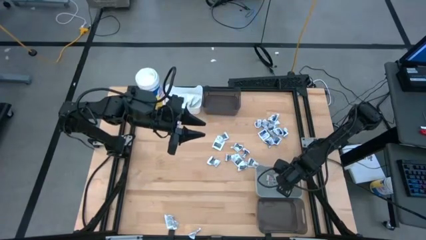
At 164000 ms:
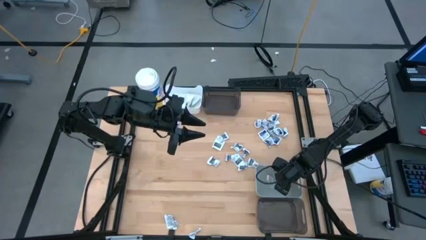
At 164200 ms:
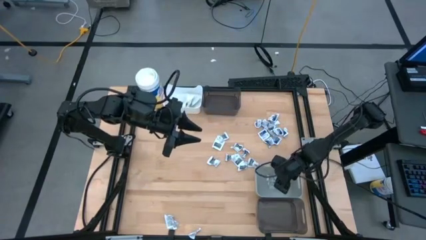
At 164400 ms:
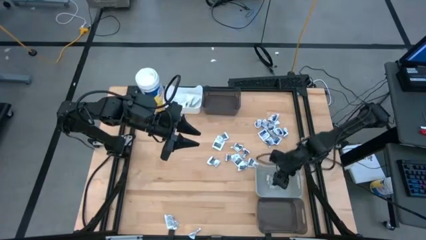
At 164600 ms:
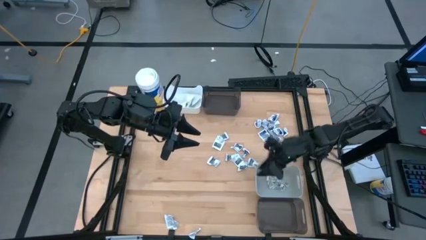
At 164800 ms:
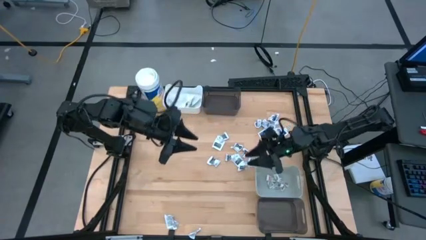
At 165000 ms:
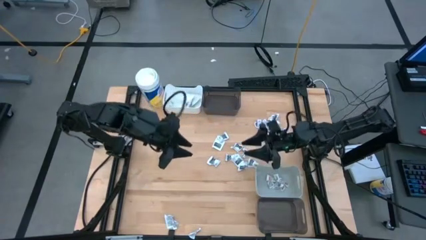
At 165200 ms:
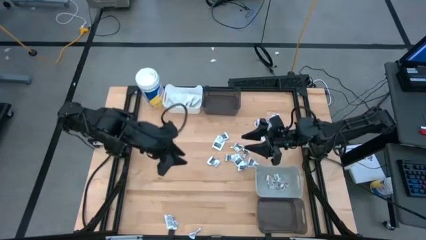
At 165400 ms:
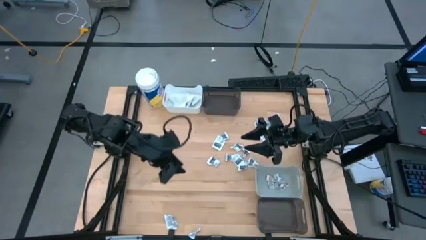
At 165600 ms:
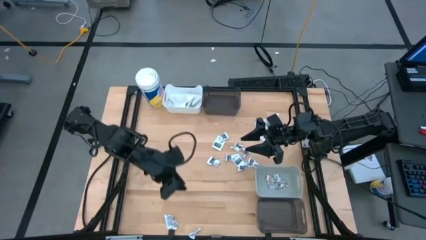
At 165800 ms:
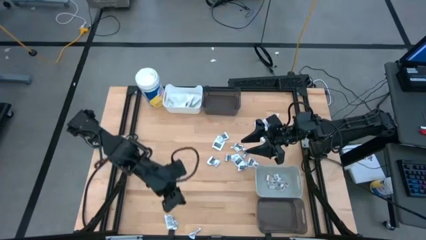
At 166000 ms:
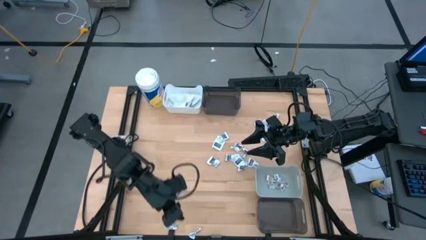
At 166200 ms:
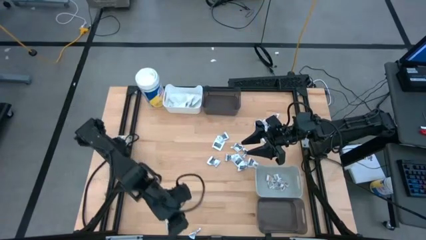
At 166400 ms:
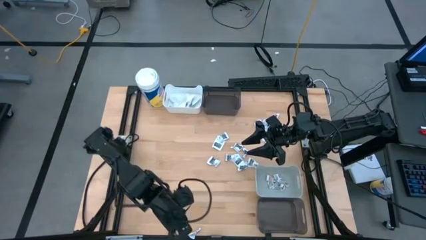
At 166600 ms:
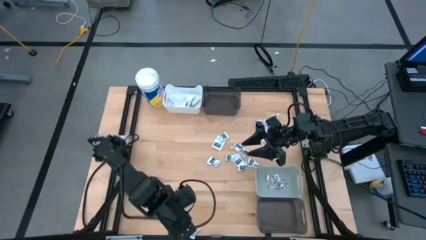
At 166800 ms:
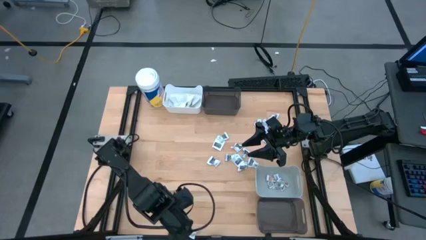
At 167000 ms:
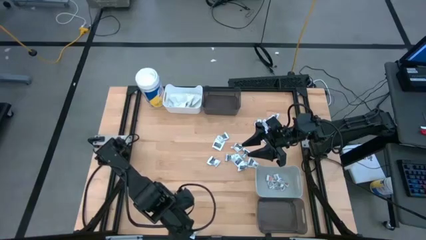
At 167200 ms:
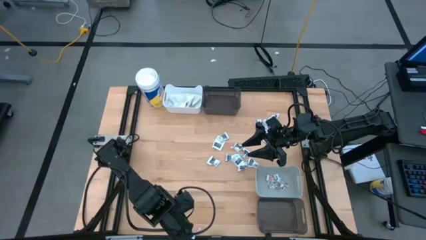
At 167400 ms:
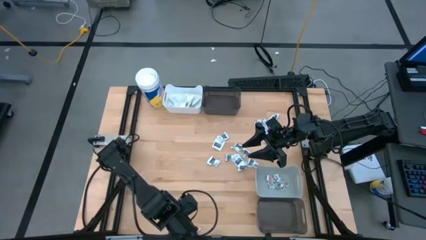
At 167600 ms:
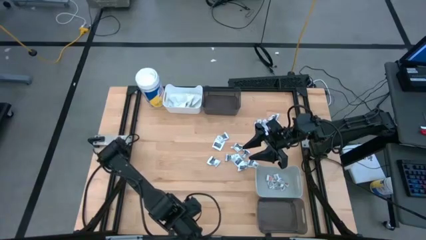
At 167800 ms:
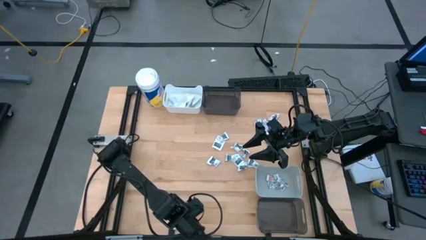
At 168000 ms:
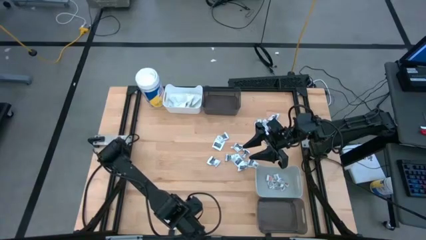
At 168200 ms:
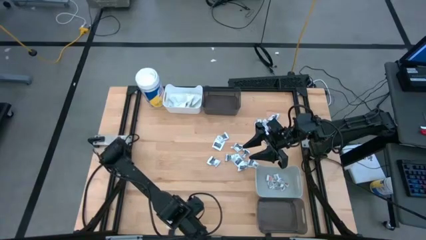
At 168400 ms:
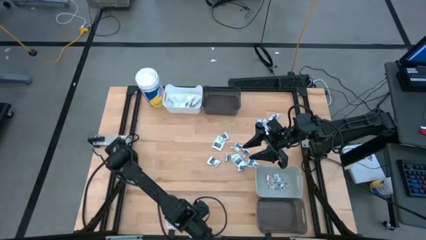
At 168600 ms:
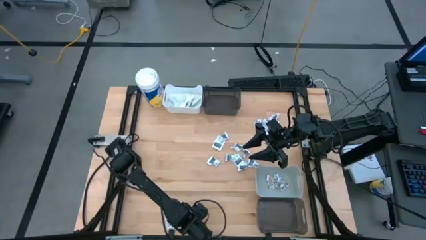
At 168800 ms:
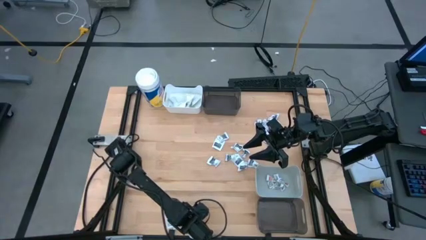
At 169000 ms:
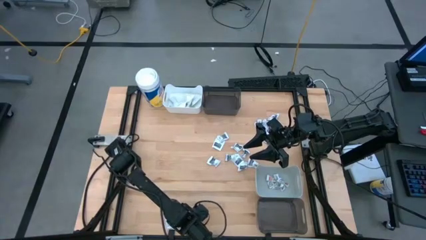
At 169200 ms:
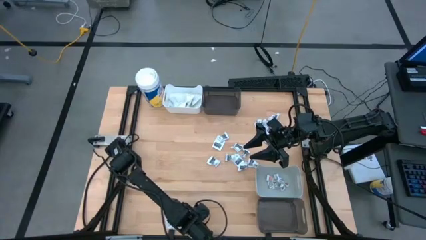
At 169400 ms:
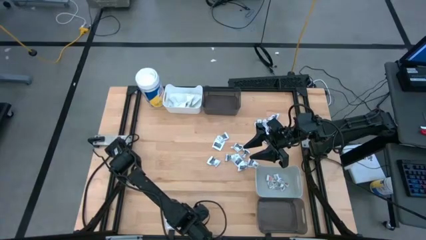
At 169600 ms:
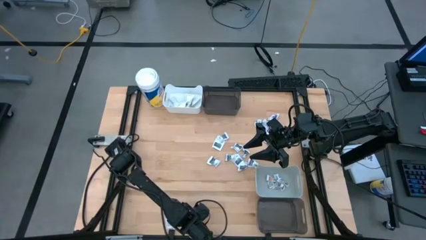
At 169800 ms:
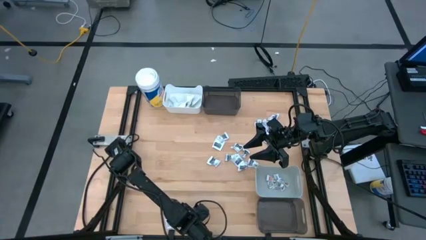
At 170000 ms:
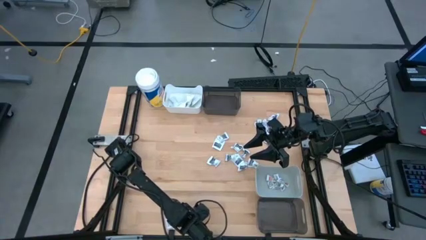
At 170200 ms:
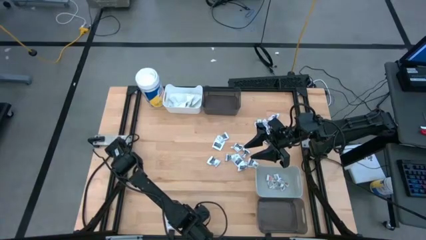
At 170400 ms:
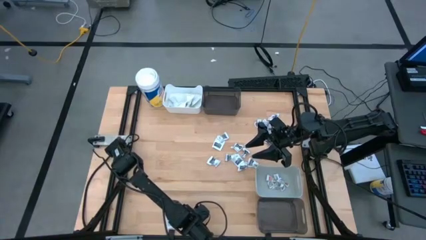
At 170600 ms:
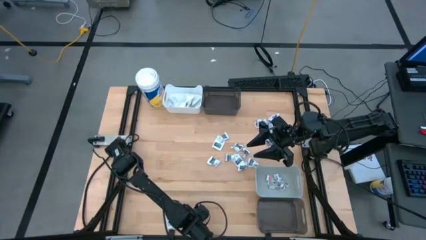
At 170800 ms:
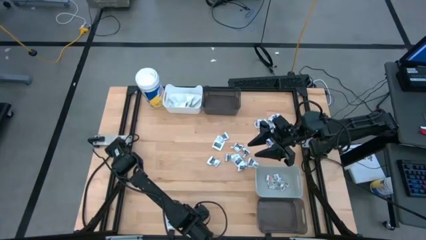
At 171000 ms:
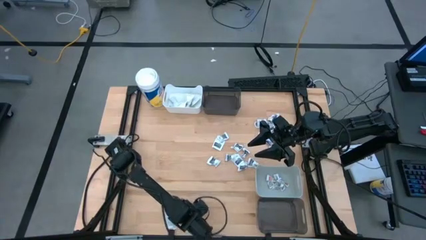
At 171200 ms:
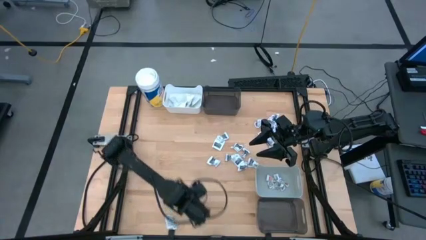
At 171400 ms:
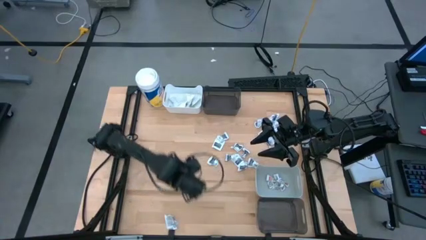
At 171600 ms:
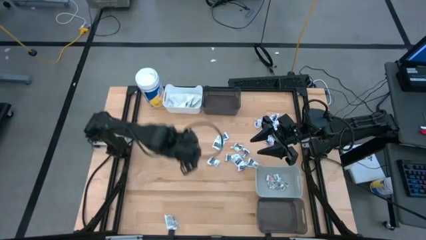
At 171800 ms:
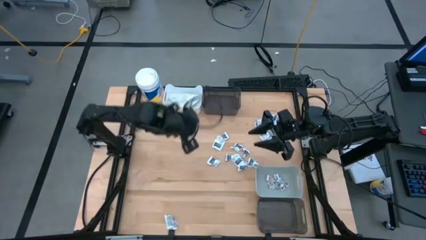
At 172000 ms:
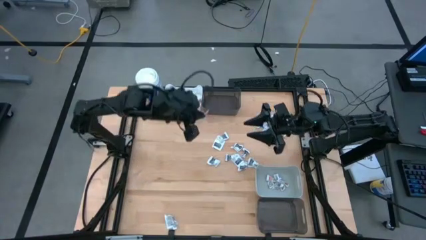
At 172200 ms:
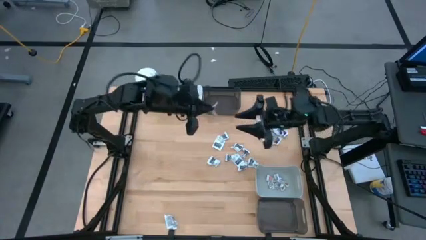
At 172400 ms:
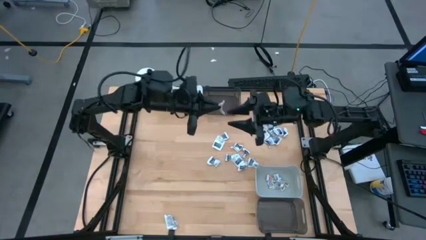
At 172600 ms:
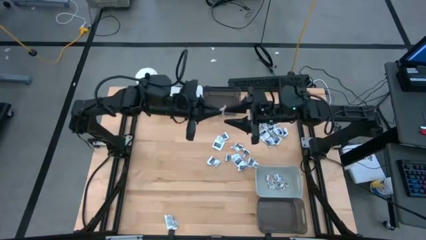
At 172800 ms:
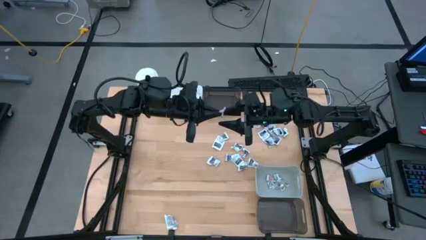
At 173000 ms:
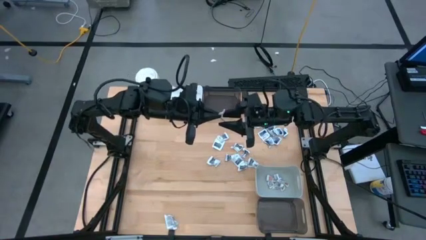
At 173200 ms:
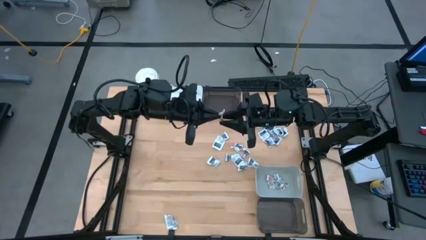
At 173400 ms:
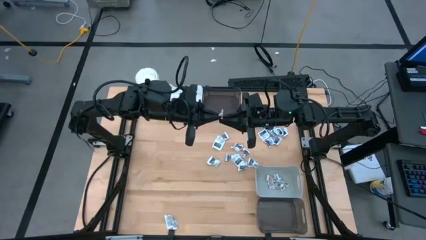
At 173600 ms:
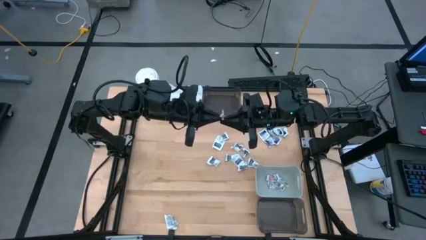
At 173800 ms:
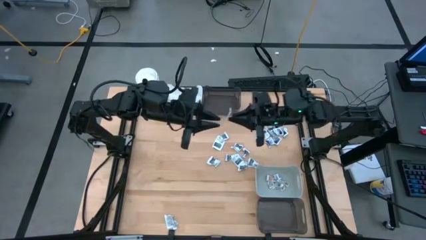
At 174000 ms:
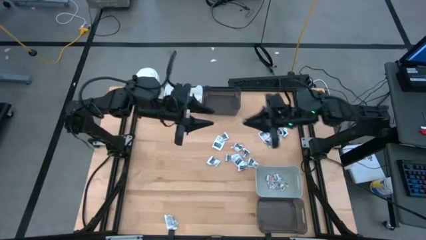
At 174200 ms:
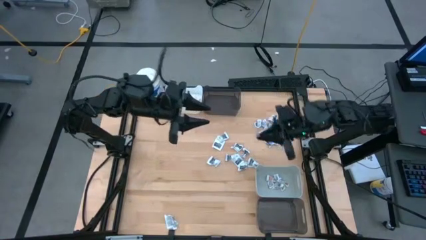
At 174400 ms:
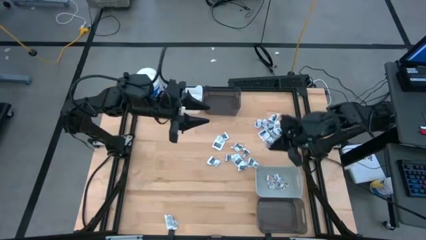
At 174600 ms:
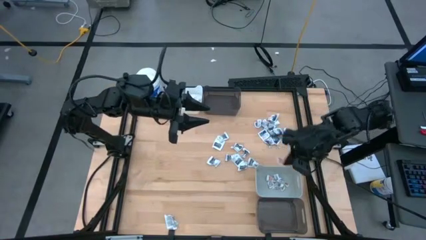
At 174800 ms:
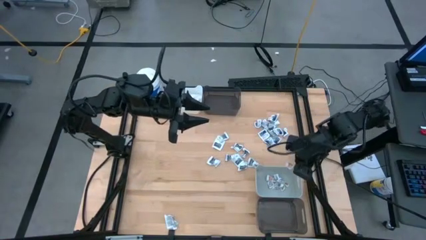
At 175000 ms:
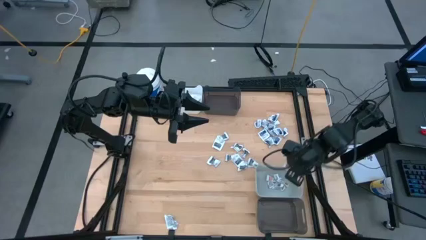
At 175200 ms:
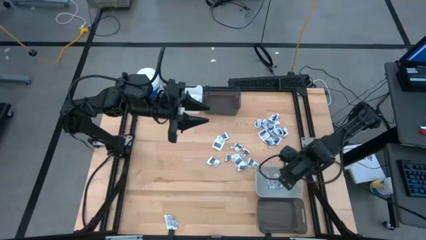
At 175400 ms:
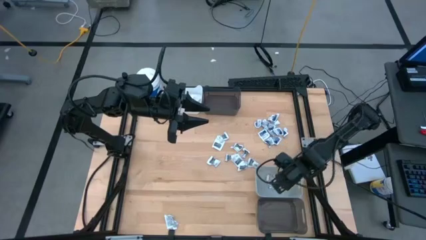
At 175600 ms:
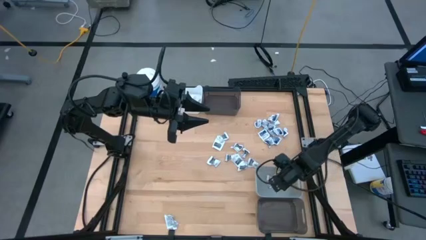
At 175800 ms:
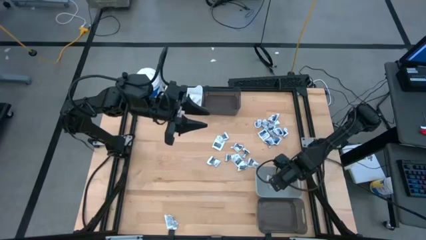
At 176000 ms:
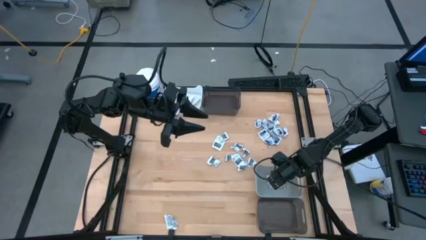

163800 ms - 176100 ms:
Task: Pick & Place First Aid Supplies
Put the orange ointment pack into the gray bin

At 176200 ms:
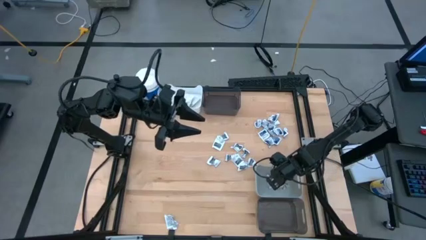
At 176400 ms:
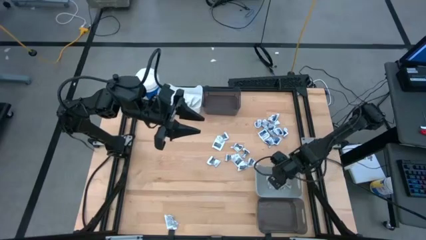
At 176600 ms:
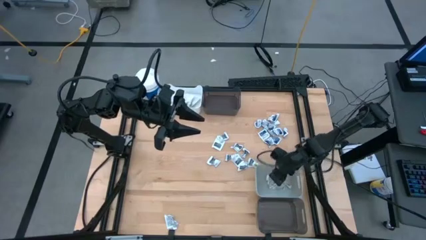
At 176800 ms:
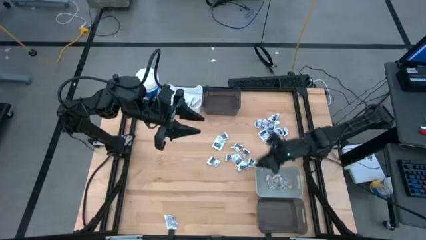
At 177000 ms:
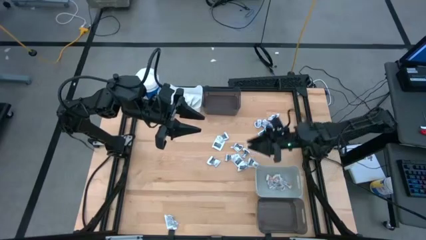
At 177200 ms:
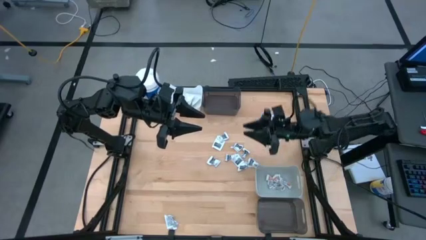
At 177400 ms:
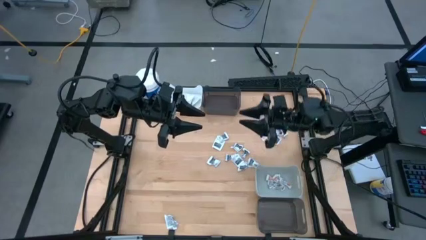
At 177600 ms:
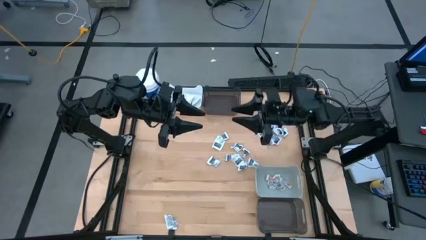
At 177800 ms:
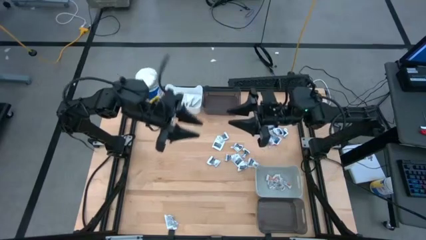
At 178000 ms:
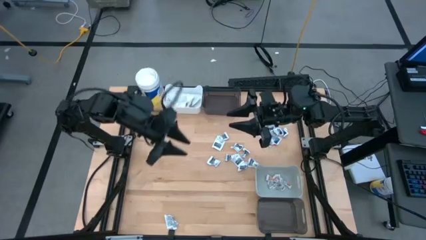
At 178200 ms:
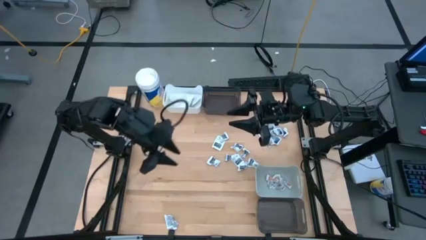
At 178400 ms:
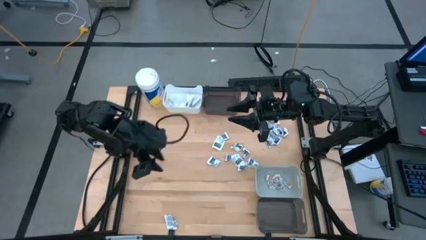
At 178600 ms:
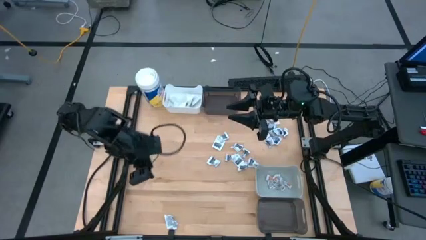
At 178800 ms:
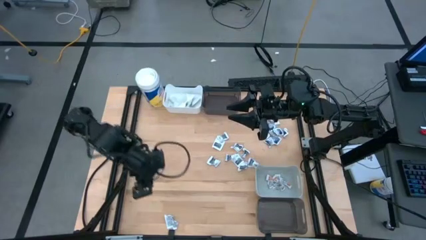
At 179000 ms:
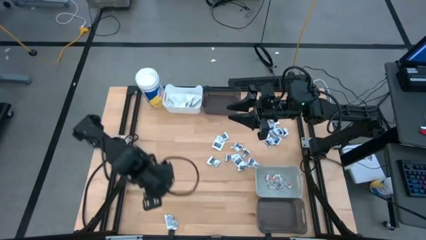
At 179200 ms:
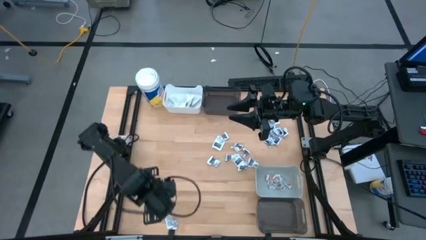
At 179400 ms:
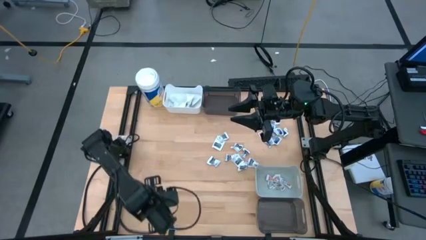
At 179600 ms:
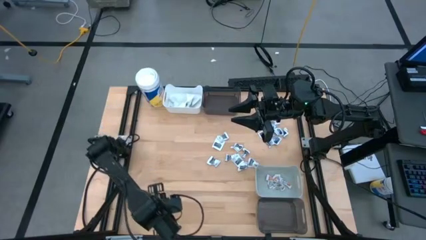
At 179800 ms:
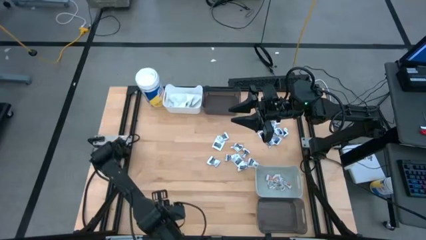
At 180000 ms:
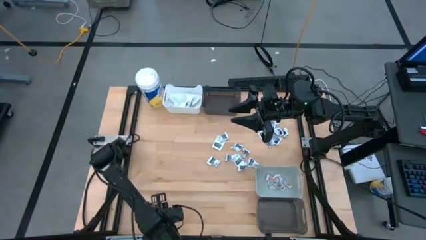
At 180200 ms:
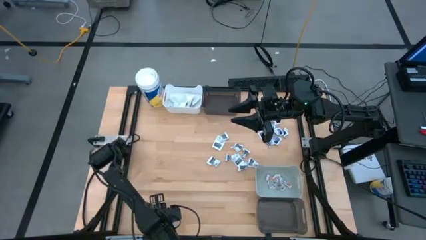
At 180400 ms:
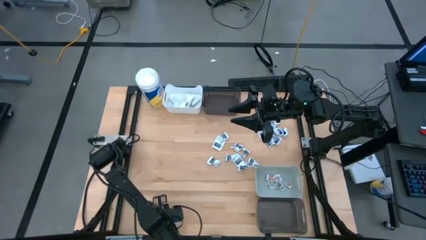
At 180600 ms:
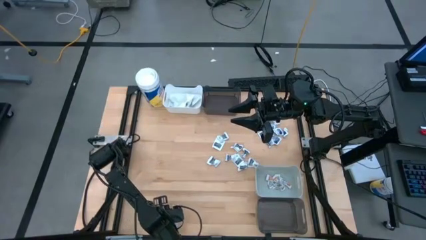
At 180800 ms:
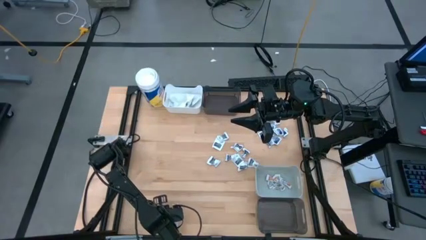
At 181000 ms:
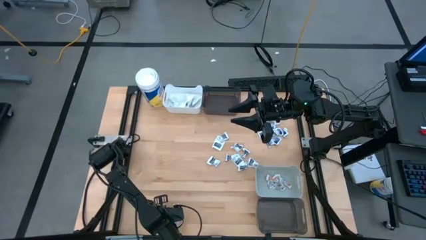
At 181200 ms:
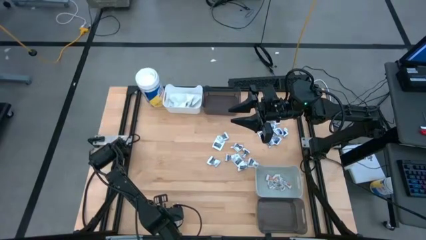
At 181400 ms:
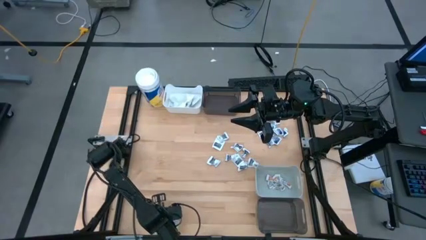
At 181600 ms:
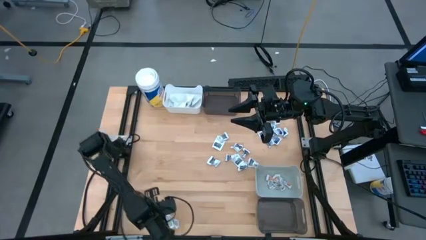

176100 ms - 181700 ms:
Put the orange ointment pack into the gray bin
